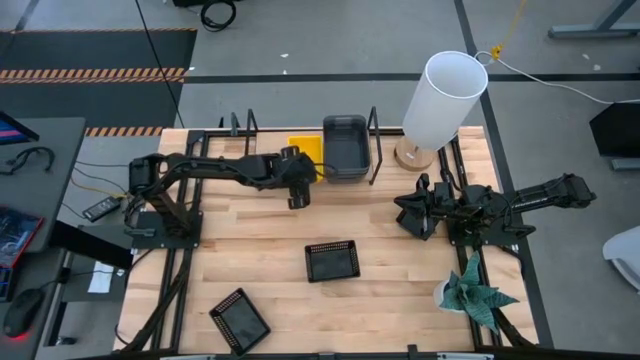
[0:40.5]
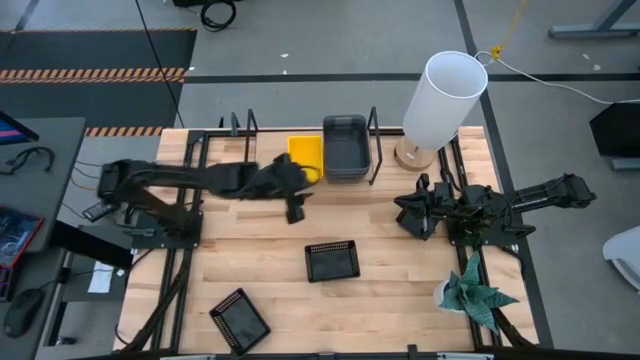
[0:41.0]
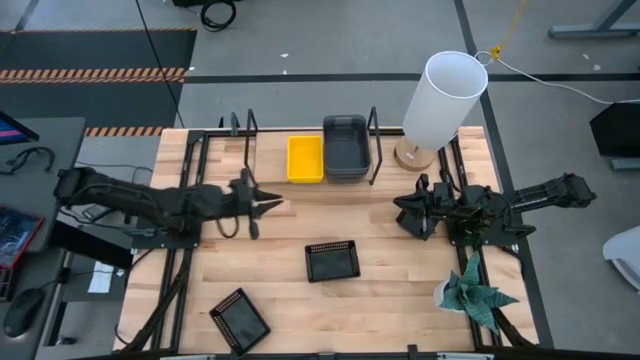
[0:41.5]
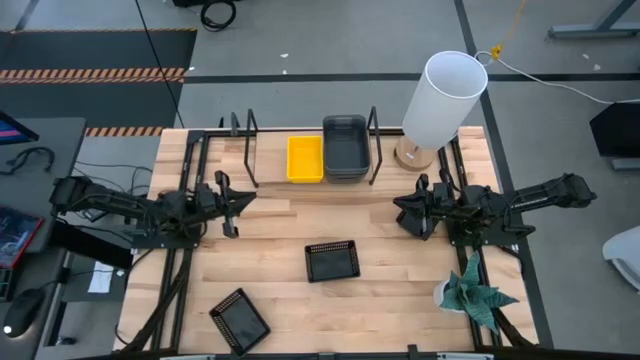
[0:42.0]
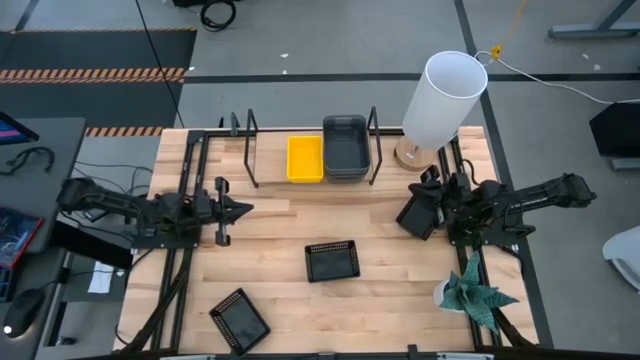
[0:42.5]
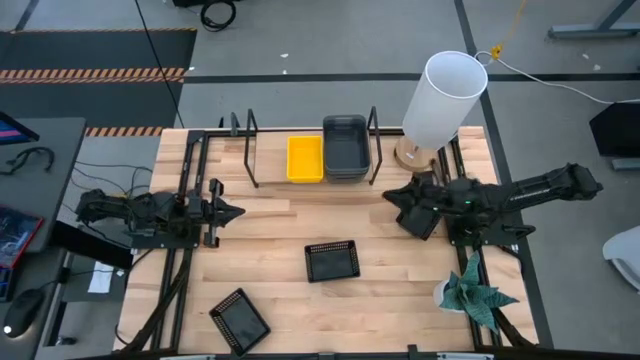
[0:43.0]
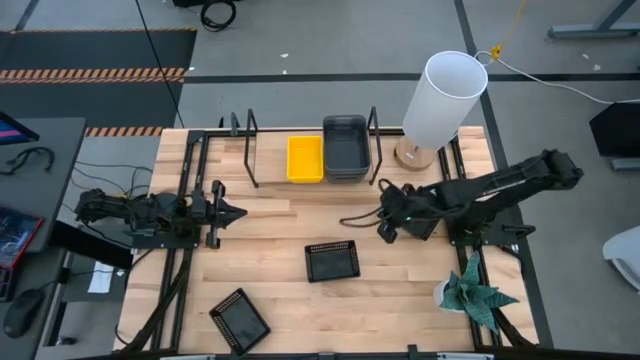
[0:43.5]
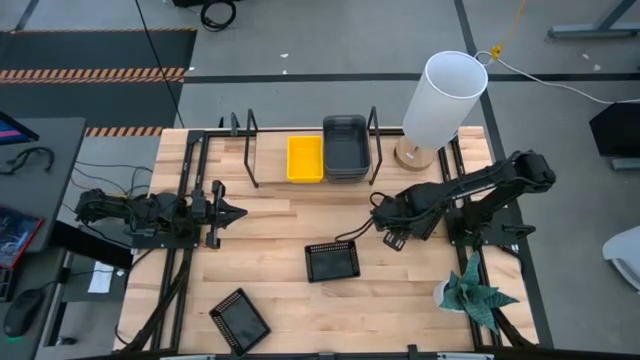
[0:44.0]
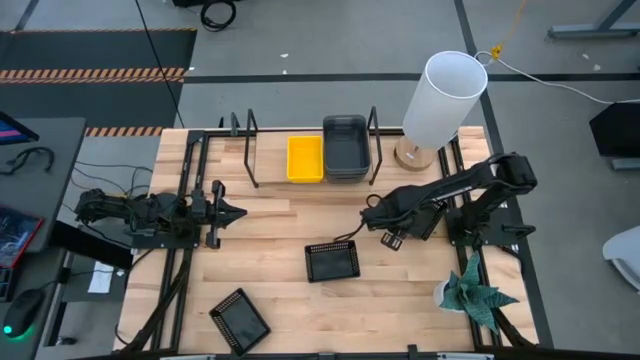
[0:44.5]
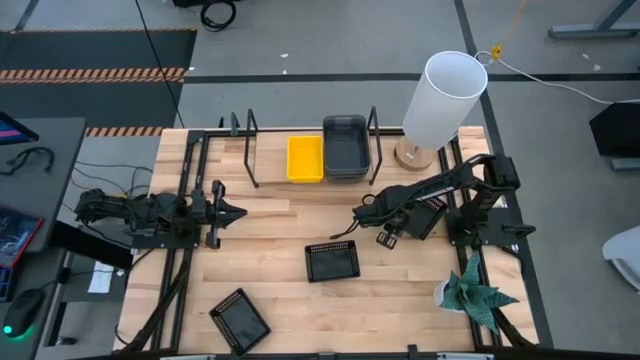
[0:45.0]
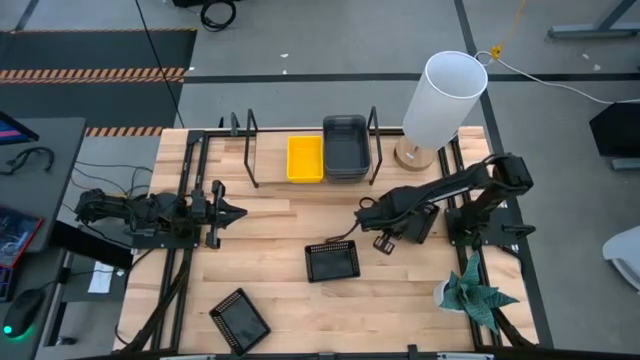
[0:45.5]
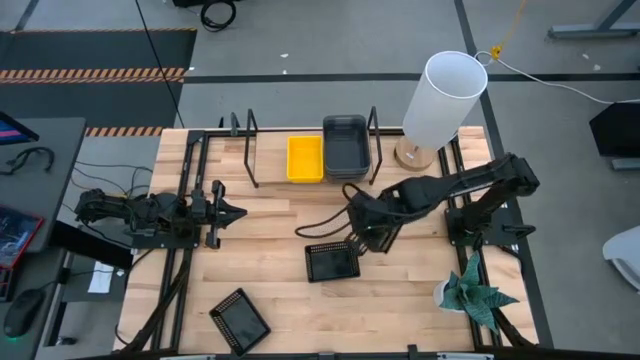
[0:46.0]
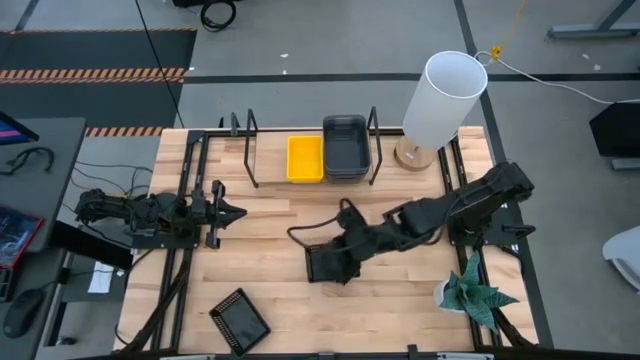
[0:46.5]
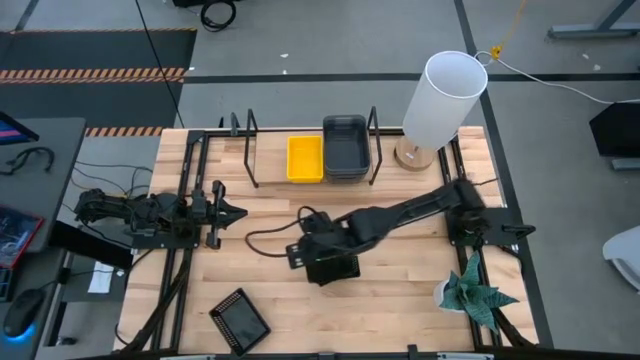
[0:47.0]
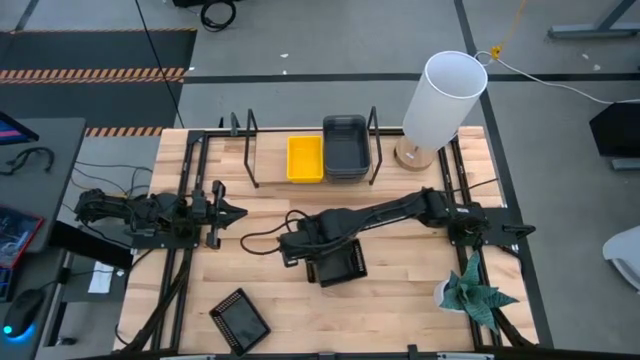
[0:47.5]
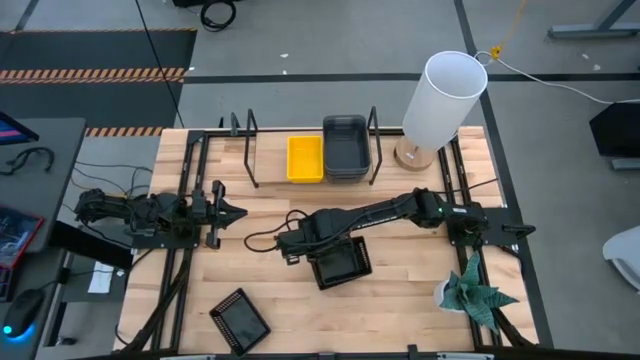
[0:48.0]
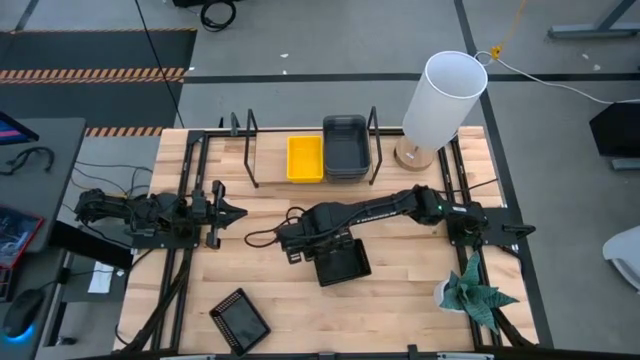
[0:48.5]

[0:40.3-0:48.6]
Task: Stack baskets on shelf by color
Stack the top black bin on top of the middle black bin

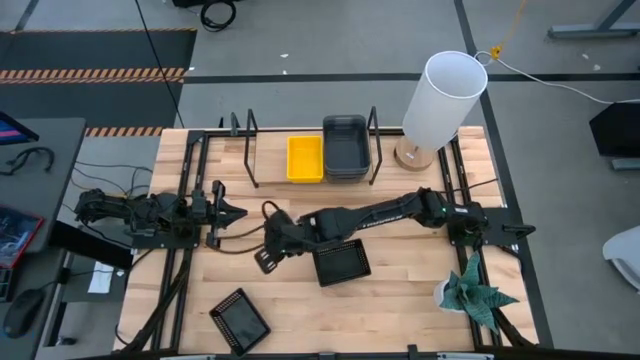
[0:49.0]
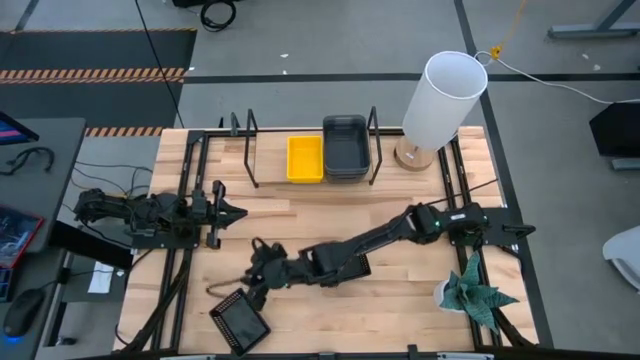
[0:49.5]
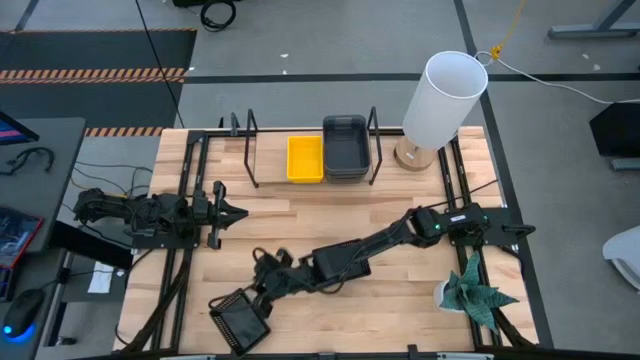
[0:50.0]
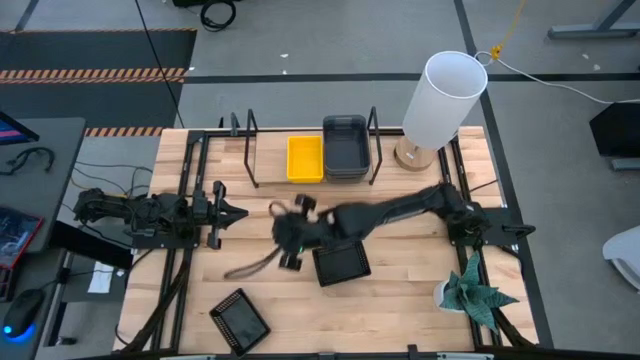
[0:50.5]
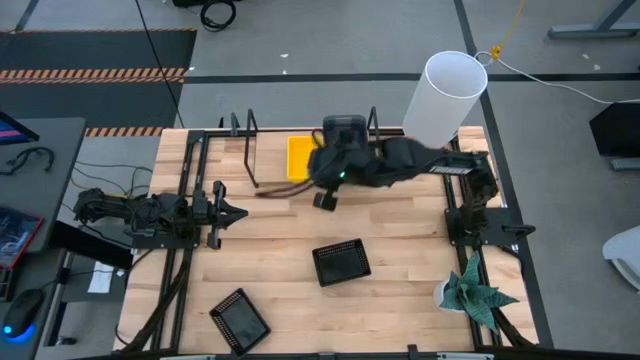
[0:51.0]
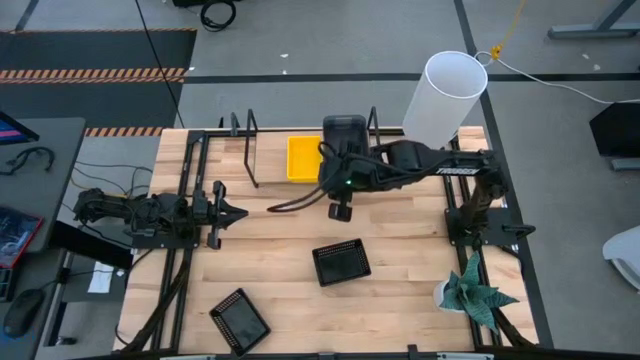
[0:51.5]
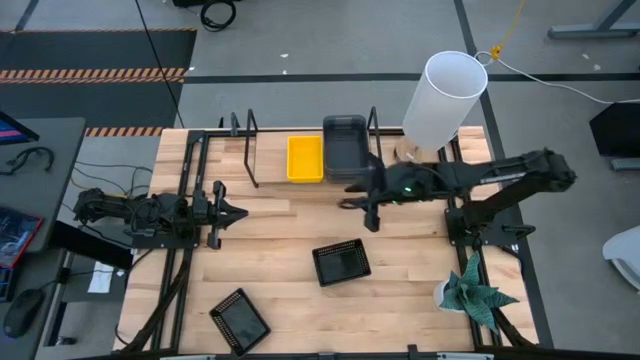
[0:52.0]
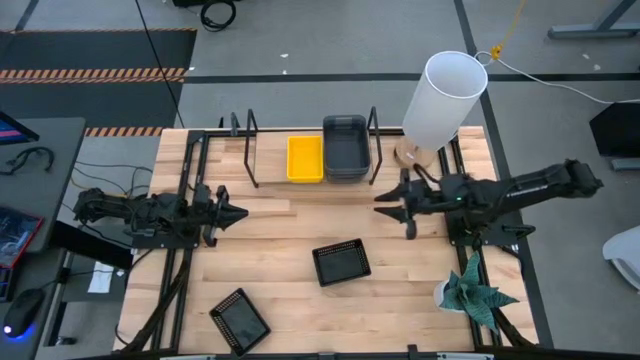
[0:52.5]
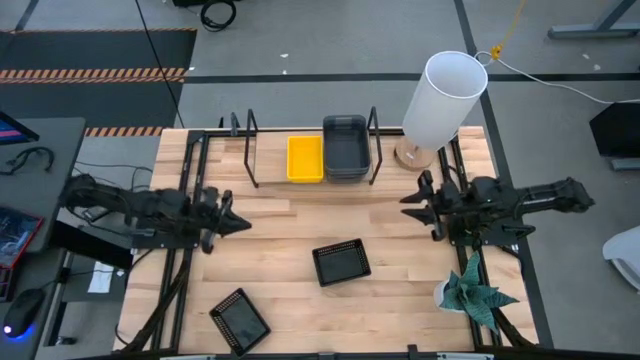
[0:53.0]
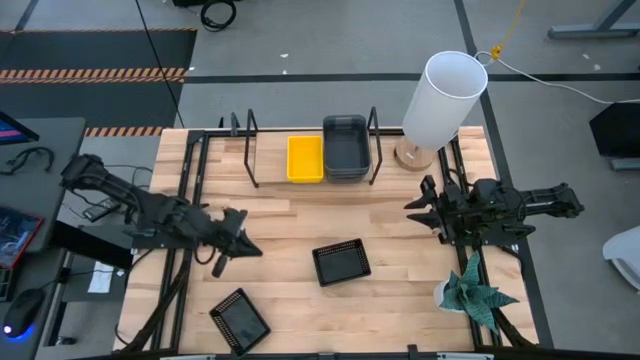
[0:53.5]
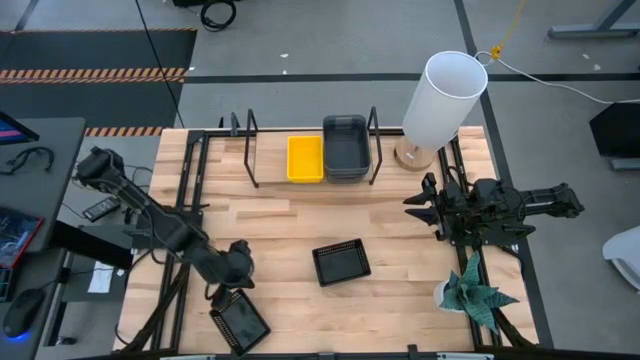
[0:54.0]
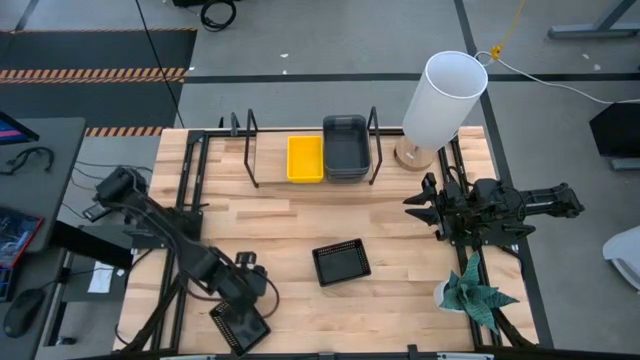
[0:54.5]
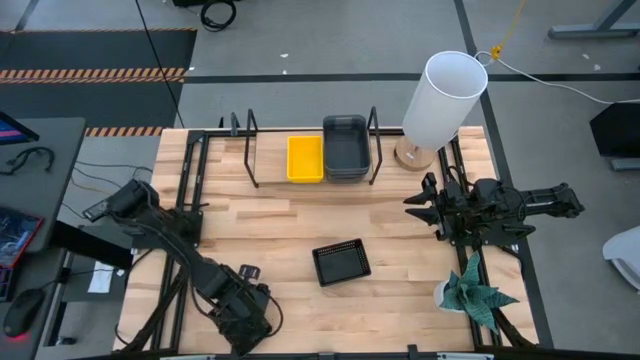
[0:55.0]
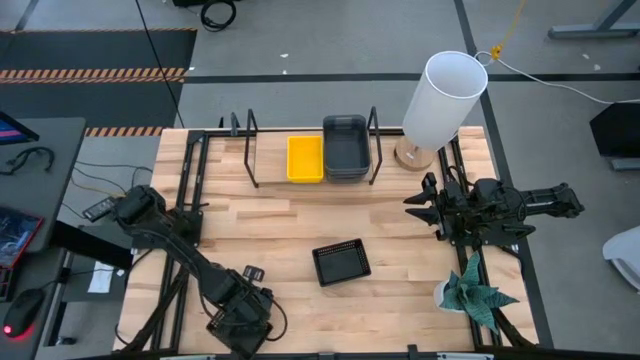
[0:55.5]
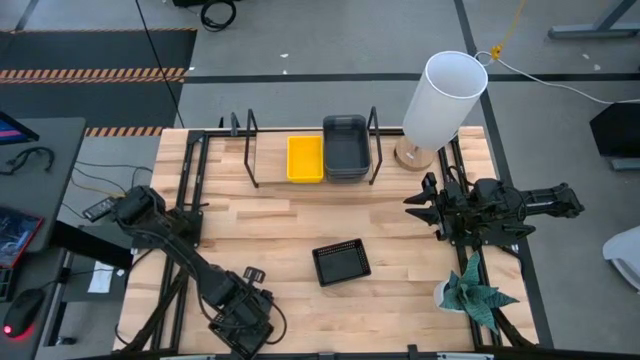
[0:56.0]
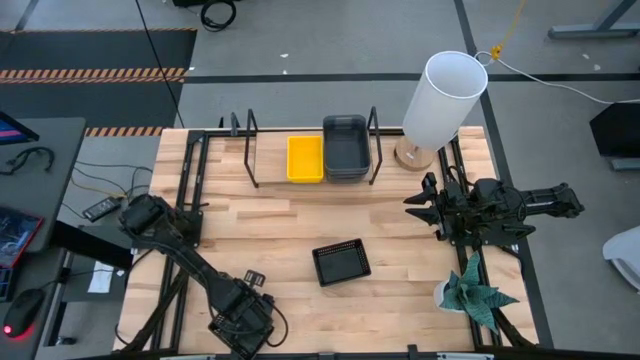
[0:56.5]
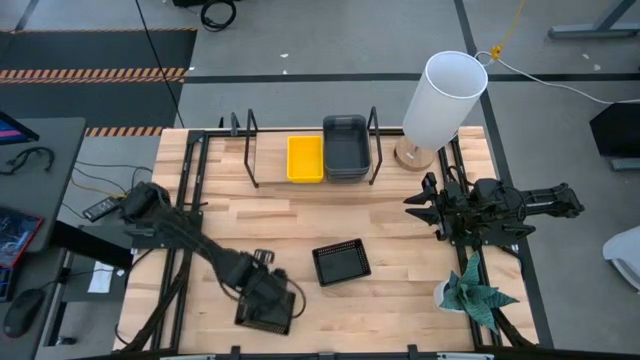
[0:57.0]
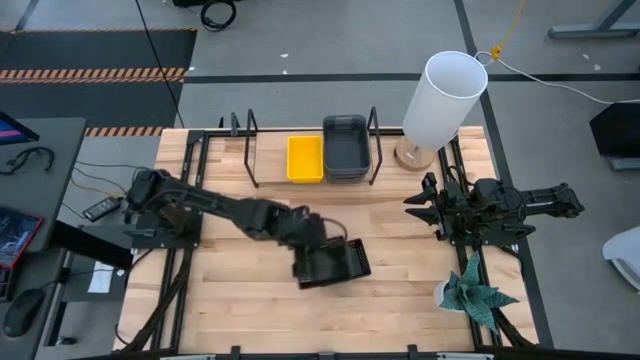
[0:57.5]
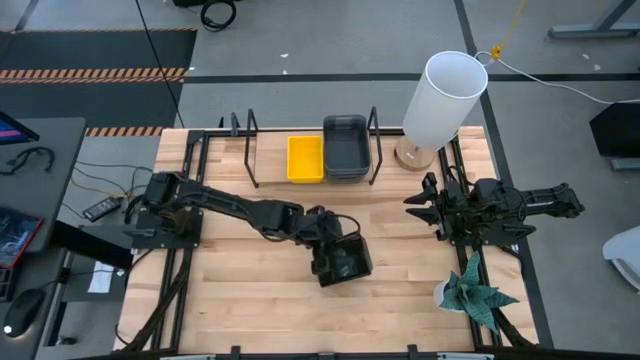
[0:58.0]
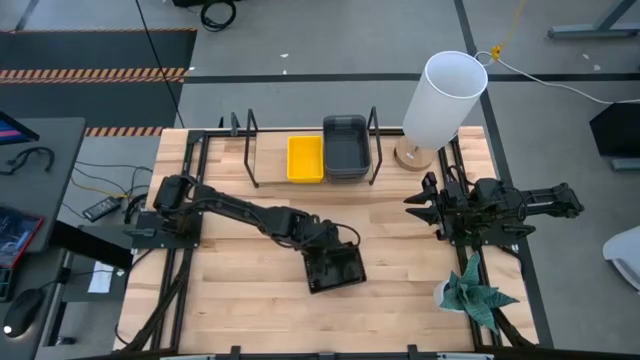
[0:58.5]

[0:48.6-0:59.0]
Stack the bottom black bin on top of the top black bins

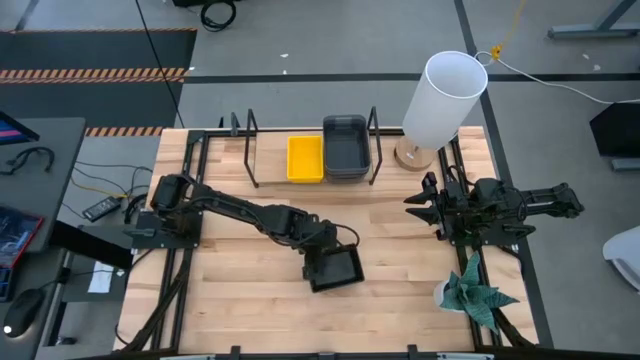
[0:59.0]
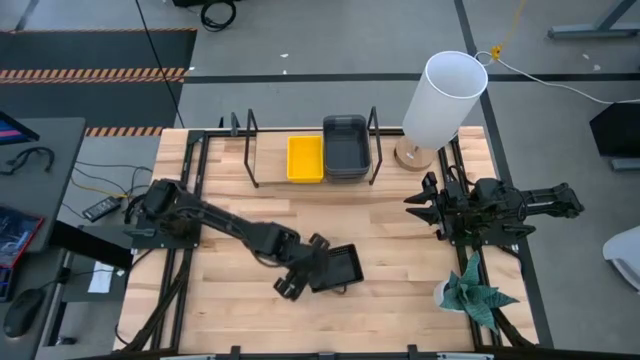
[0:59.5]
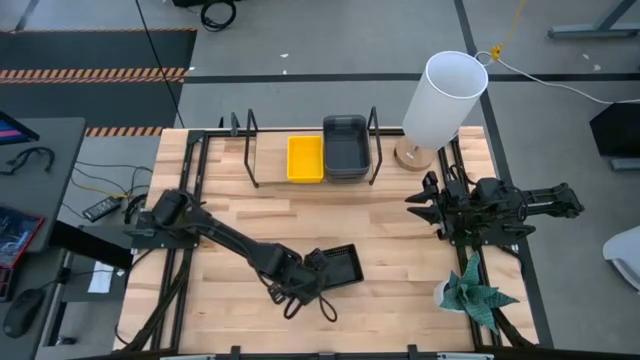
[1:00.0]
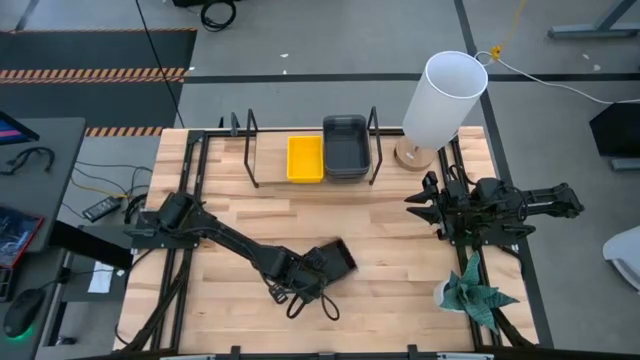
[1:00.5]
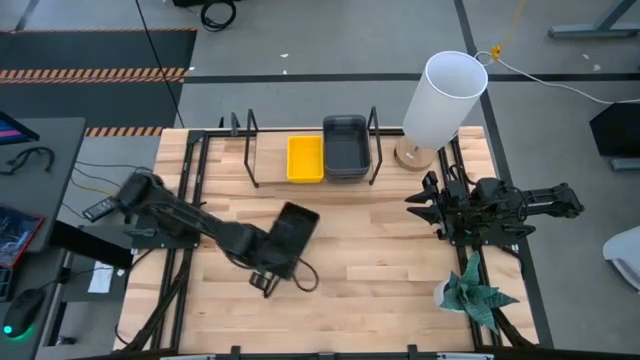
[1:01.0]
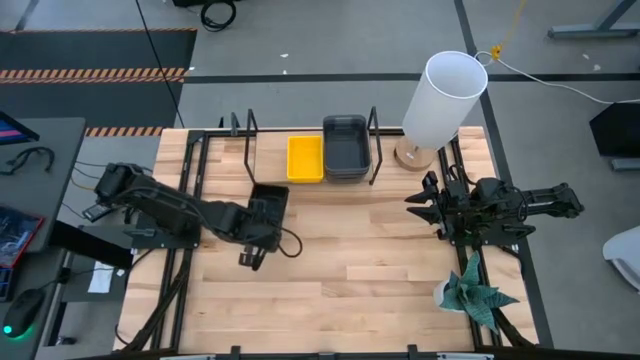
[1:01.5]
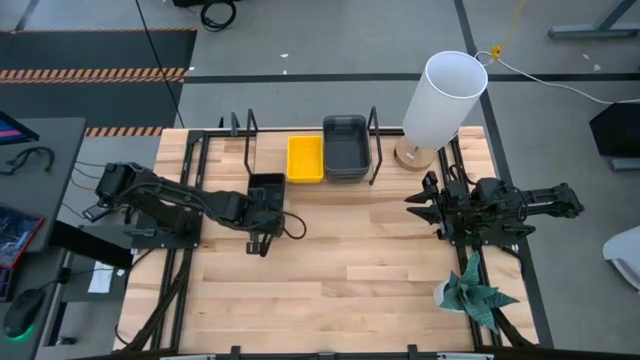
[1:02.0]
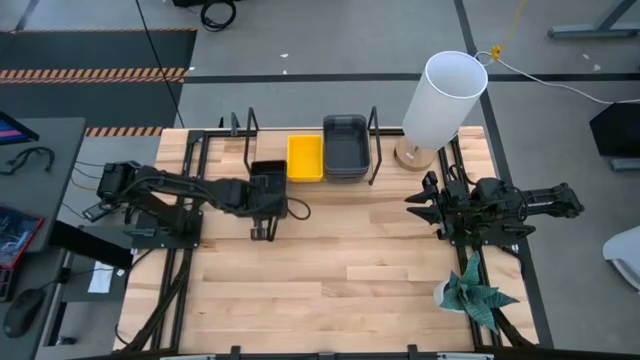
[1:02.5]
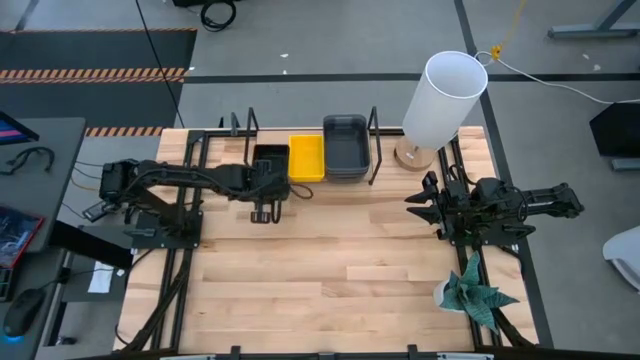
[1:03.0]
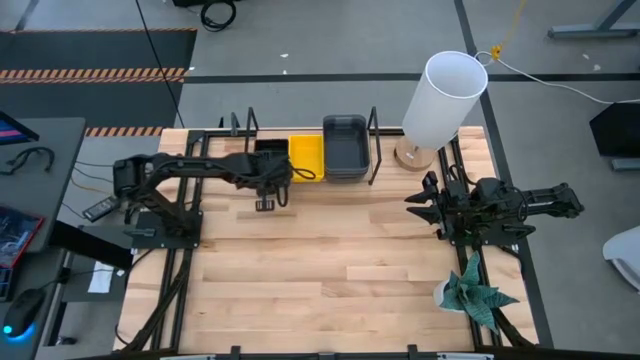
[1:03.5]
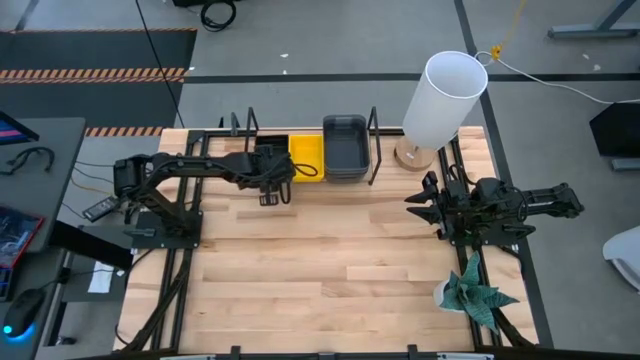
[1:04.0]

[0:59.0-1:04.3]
Put the stacked black bins on the shelf
